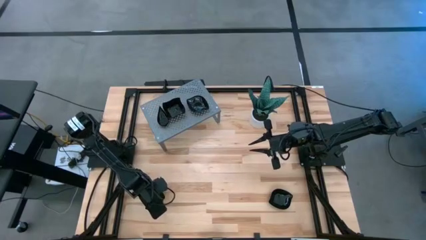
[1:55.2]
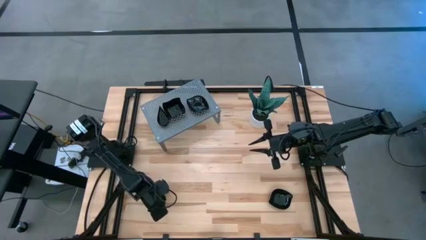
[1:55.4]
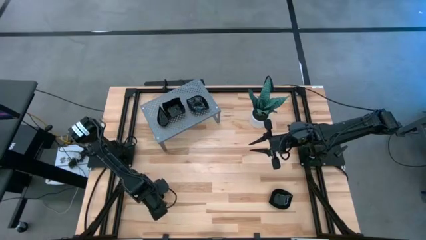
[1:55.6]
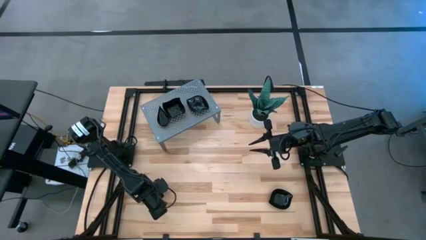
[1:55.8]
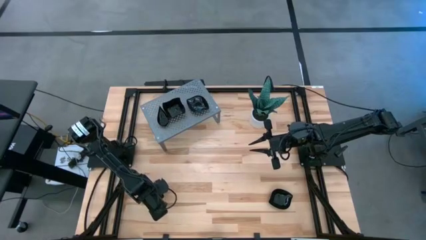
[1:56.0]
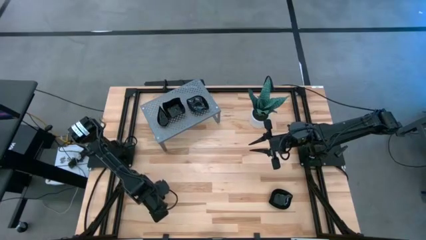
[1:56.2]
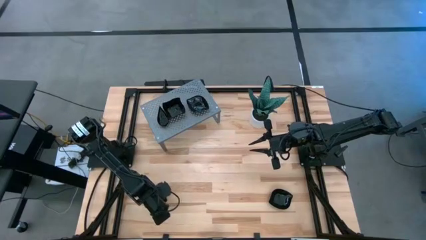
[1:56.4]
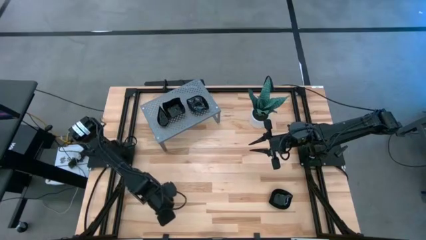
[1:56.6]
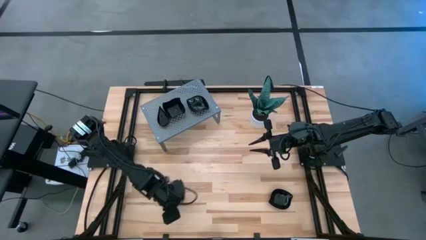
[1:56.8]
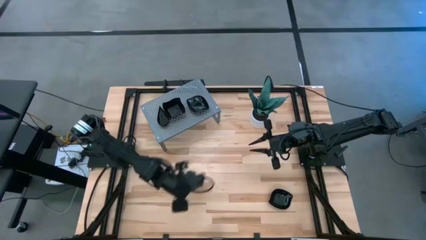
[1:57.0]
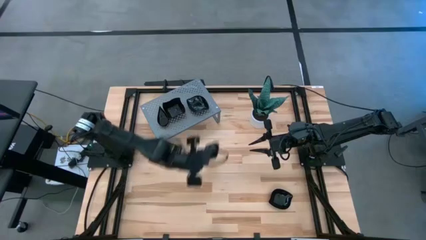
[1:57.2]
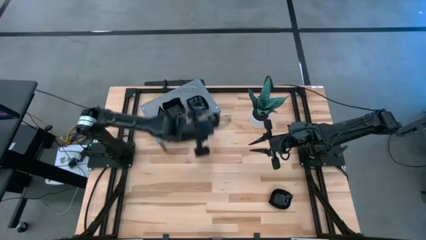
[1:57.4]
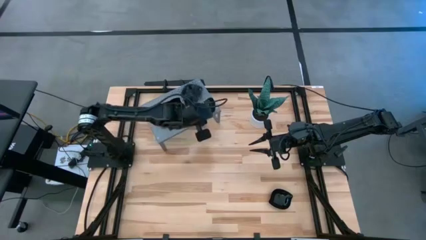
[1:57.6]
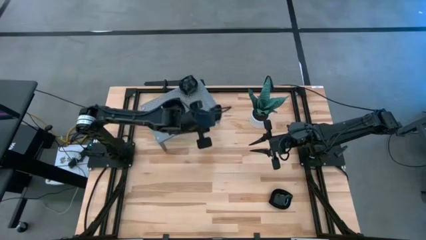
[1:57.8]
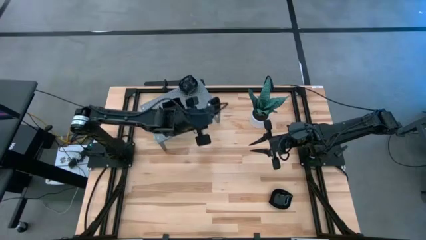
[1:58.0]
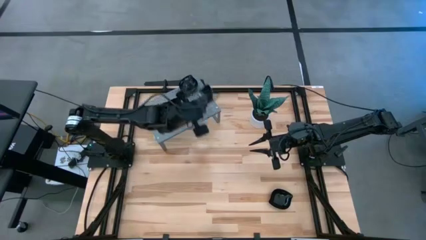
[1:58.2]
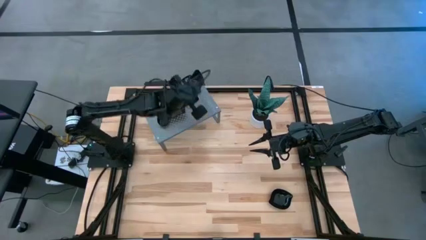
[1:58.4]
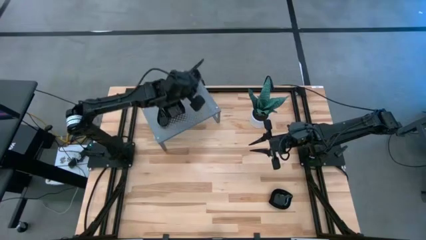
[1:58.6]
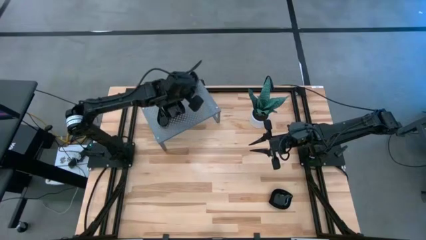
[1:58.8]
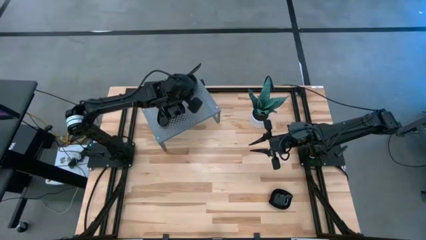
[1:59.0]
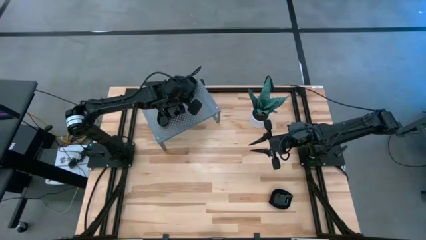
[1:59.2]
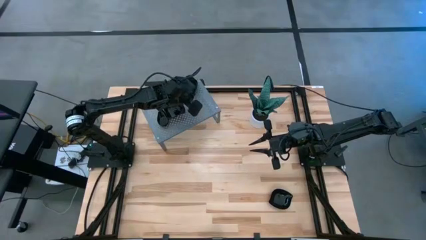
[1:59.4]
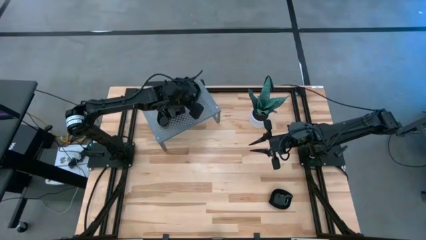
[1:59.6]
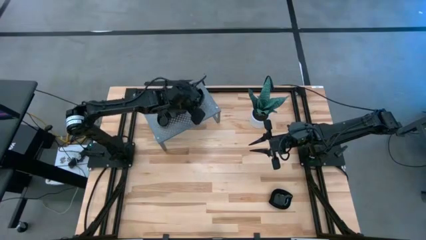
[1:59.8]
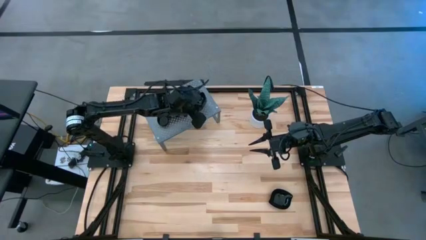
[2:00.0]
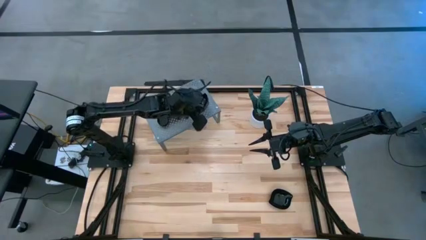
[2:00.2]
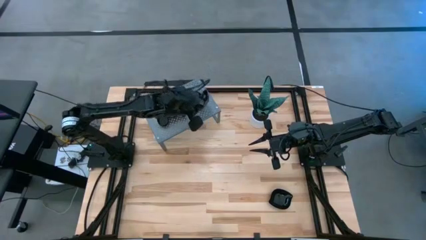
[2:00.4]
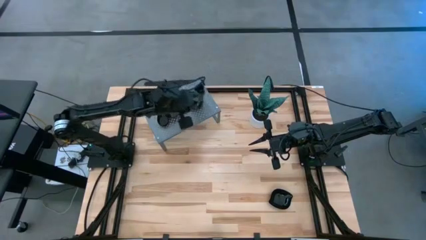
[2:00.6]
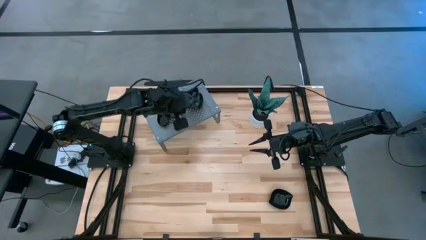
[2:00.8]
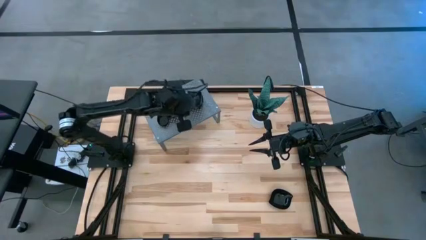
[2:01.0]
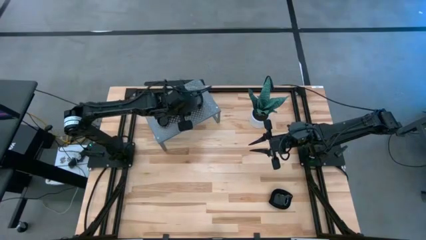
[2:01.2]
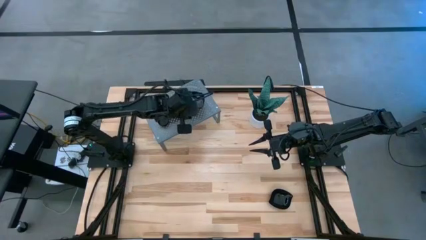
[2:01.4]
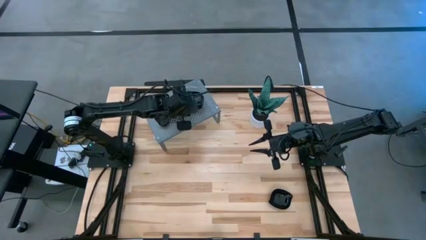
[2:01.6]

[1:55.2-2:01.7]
Task: Pick & Place Mini shaped plates
Stack the black leaf-shaped plate on the black leaf-shaped plate on the shelf

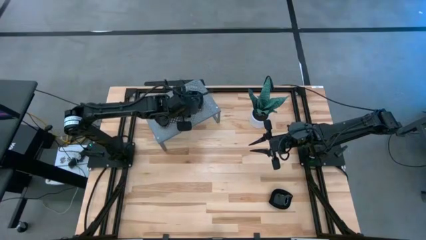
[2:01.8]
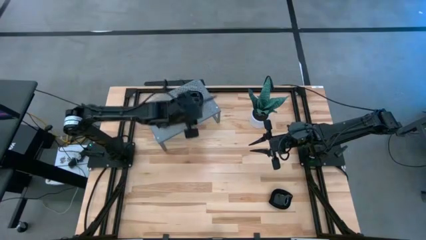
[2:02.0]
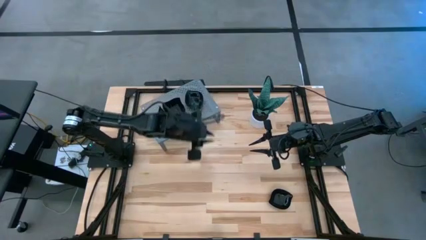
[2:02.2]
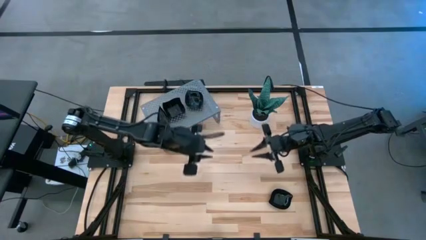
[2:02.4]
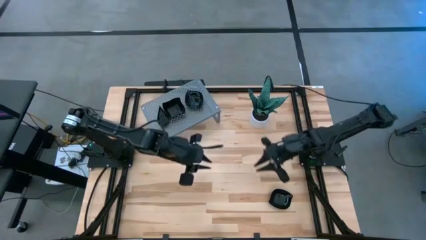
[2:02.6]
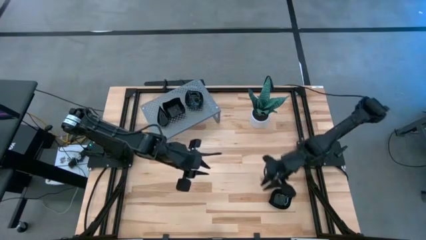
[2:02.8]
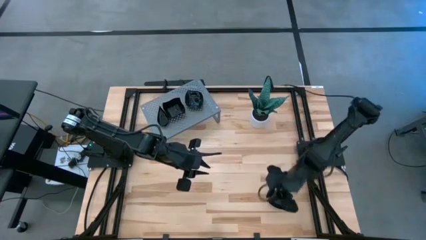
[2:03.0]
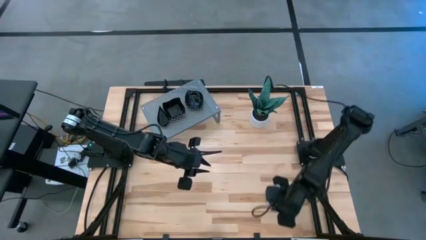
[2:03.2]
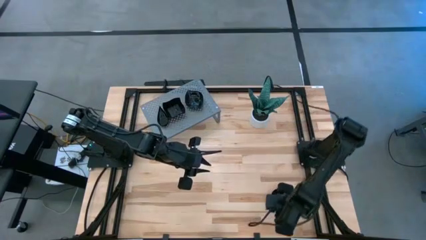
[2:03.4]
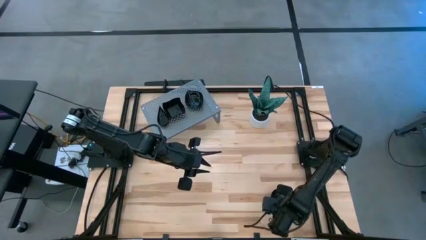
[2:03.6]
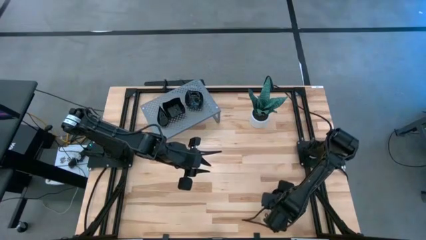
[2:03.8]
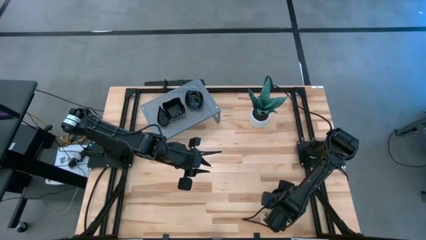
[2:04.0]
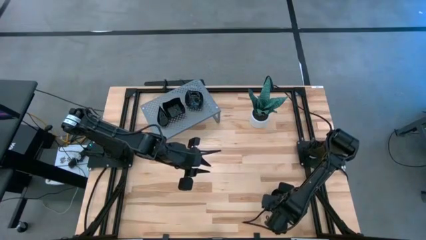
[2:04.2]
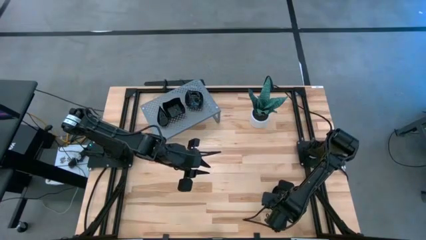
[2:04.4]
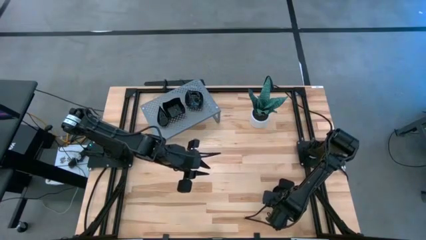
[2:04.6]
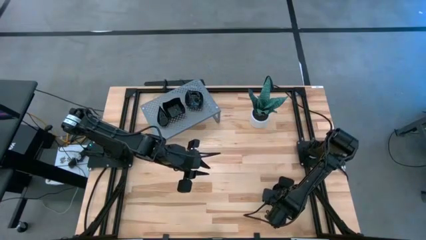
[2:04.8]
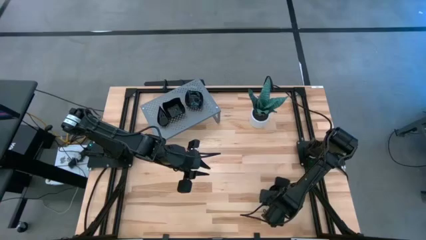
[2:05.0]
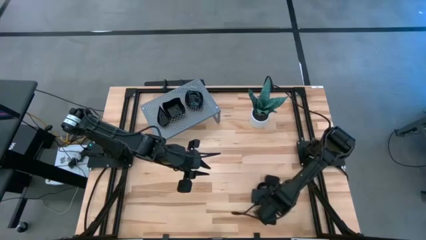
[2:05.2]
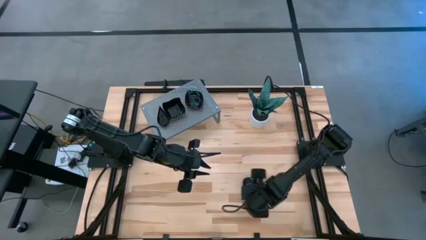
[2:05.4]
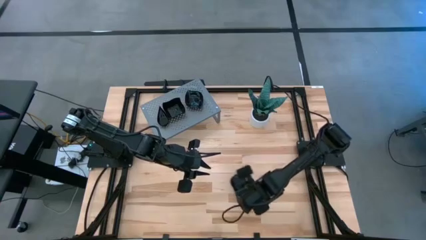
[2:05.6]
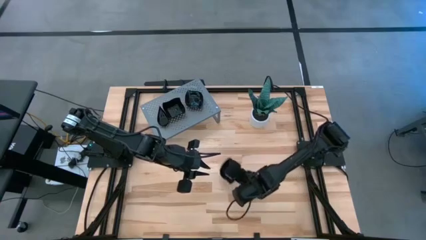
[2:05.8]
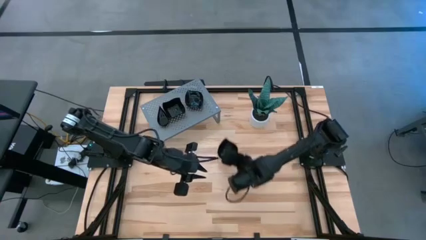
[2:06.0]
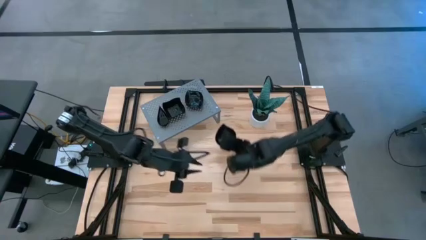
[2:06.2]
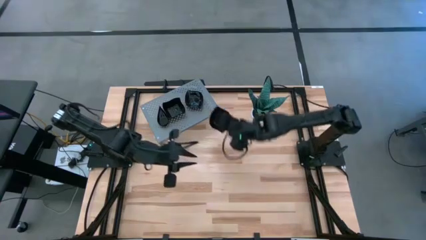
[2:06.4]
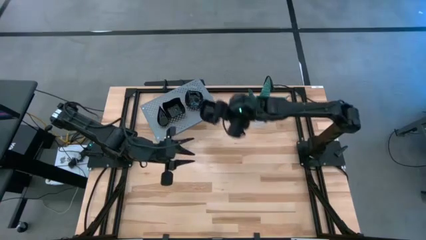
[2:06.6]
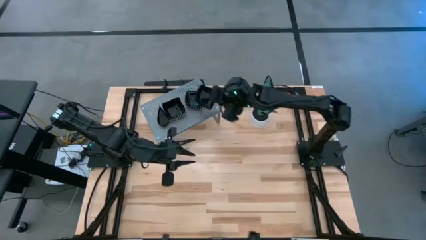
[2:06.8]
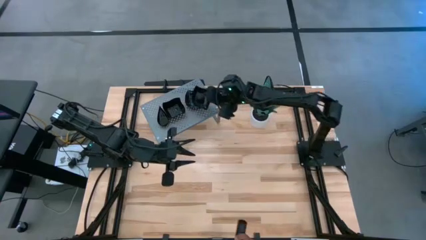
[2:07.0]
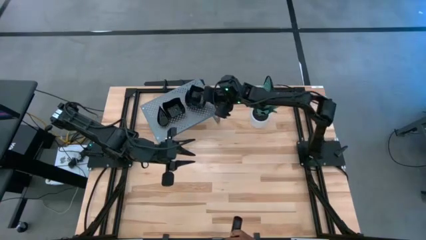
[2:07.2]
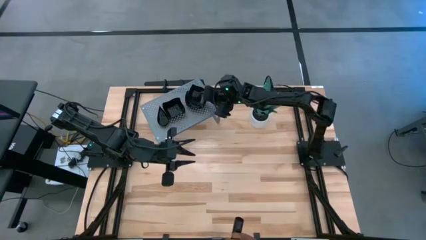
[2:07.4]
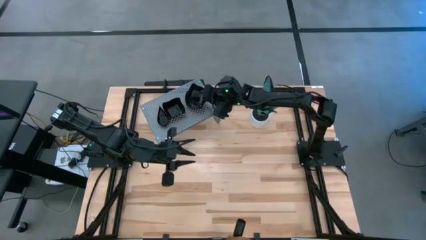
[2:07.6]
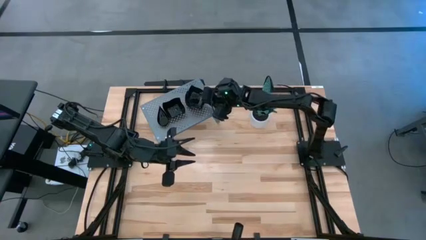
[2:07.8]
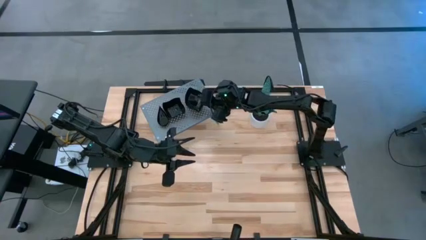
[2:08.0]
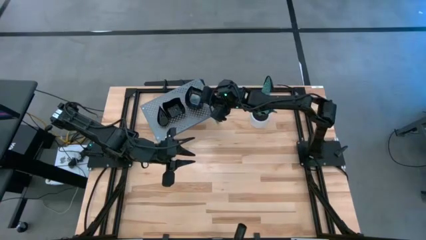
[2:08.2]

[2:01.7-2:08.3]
Stack the black leaf-shaped plate on the black leaf-shaped plate on the shelf

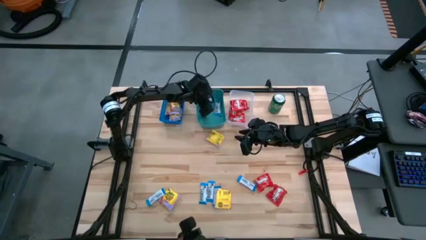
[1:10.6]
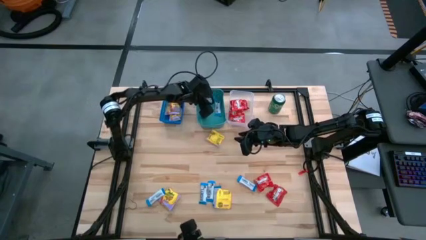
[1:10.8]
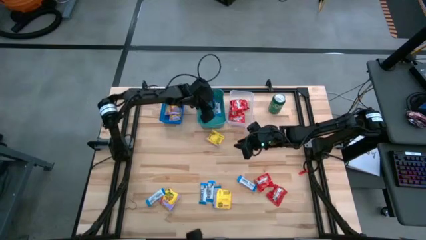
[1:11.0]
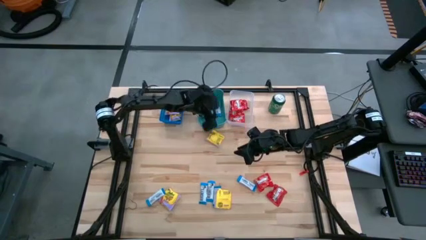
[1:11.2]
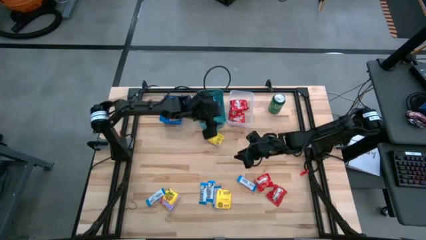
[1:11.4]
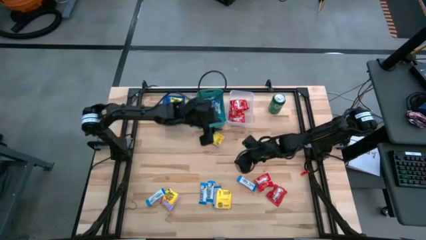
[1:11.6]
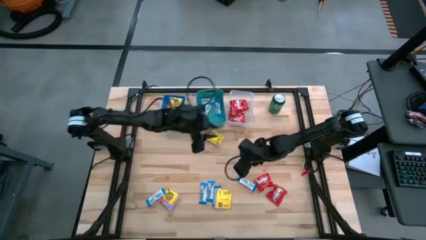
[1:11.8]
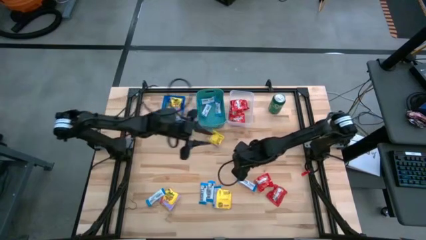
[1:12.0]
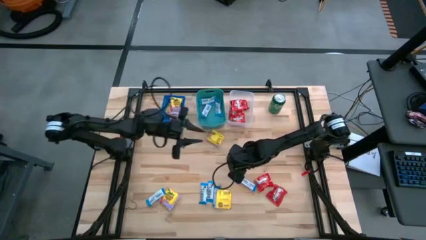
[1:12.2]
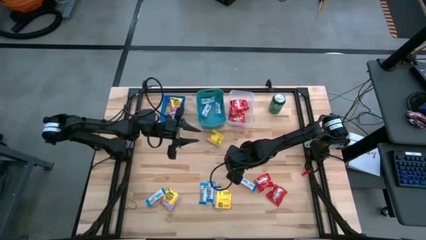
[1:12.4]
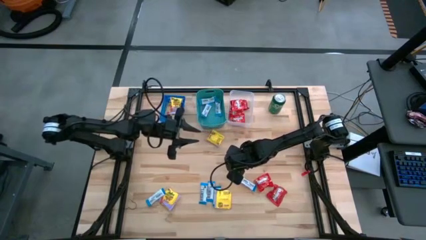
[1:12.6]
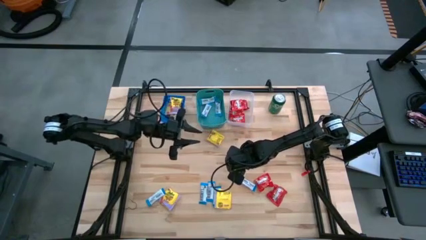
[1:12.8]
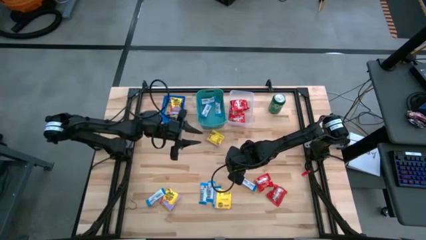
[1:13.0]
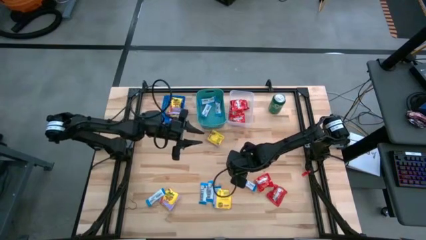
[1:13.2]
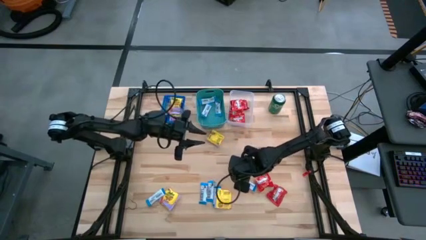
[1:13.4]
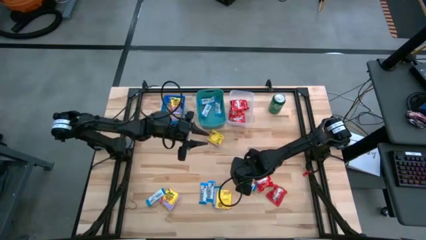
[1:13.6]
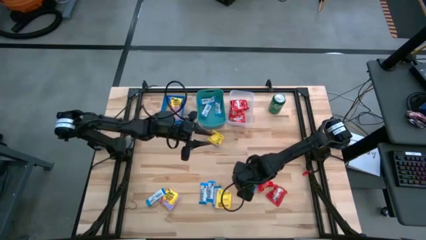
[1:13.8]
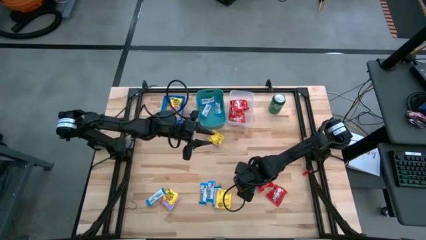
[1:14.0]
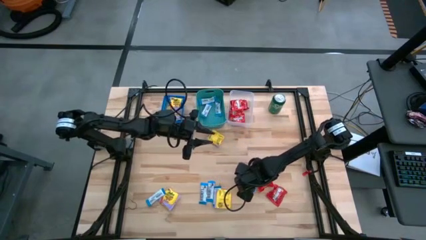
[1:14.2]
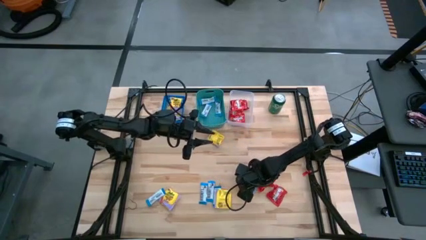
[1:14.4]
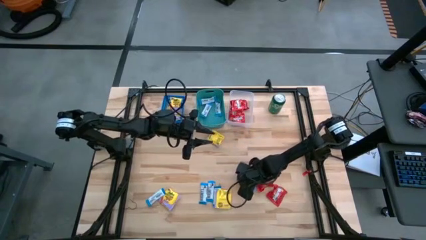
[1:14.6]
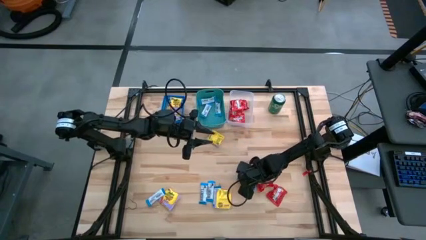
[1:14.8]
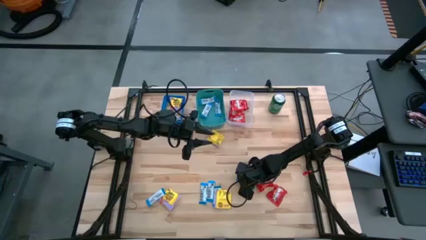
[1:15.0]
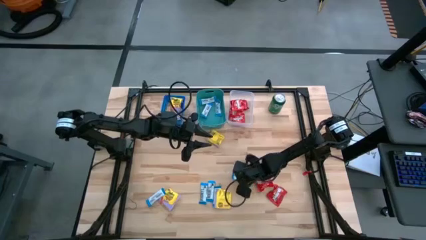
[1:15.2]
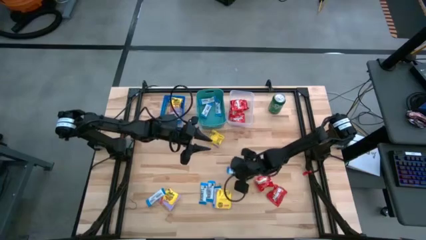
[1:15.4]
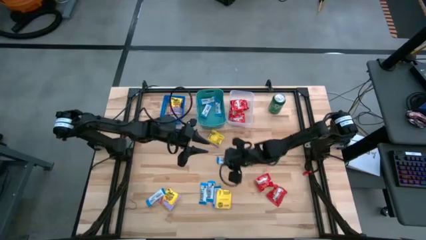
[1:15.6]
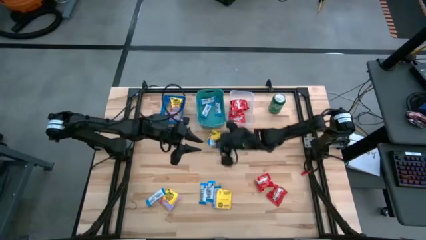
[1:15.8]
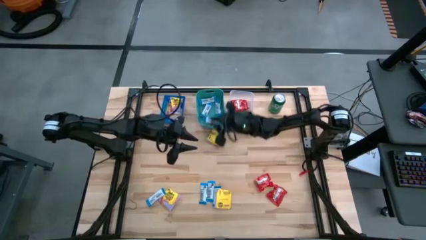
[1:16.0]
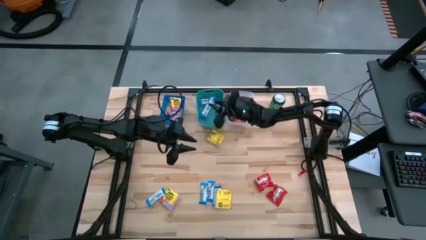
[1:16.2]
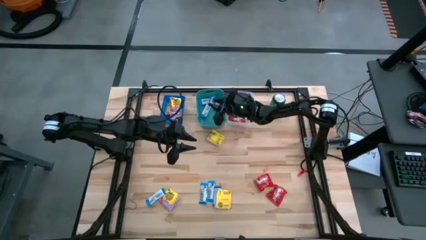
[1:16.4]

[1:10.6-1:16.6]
Task: Sort candy
Put the white chocolate bar into the green bin
